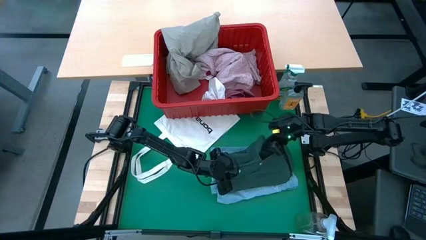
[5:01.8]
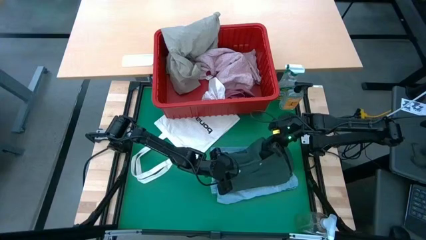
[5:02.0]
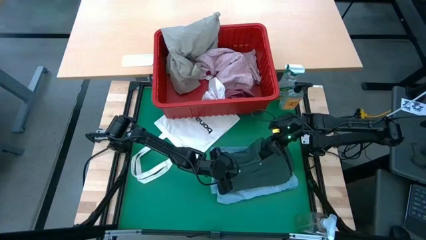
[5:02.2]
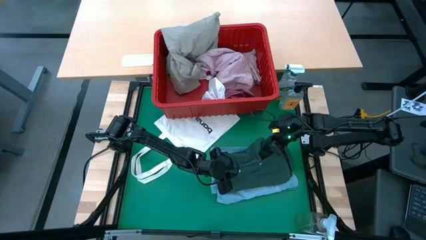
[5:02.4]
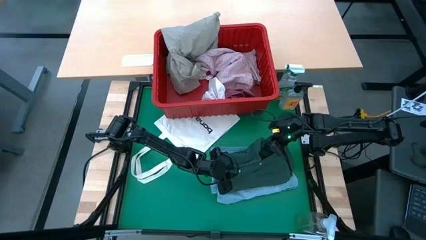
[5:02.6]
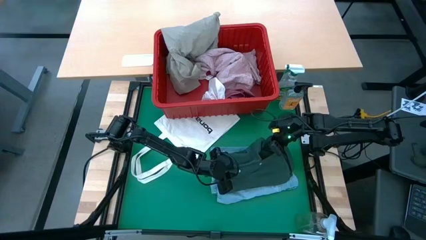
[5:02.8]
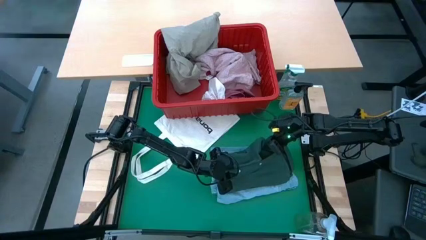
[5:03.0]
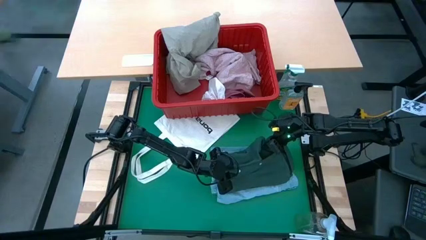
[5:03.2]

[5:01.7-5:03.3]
Task: Fold laundry
Fold the green shirt

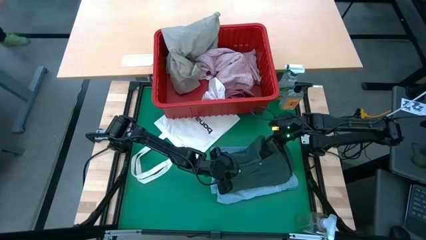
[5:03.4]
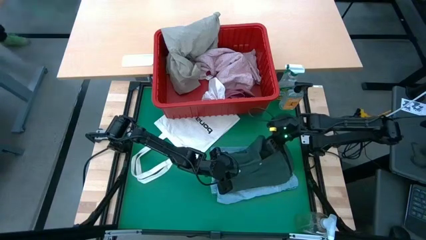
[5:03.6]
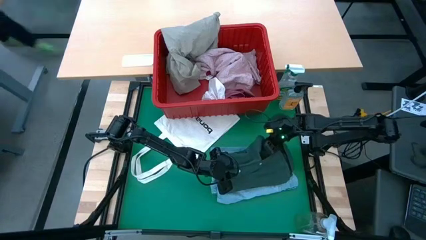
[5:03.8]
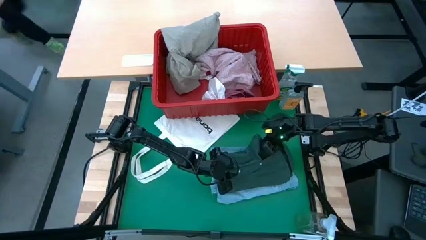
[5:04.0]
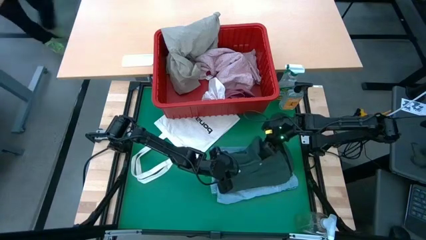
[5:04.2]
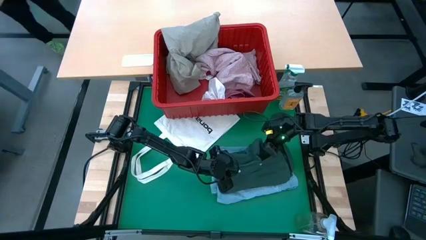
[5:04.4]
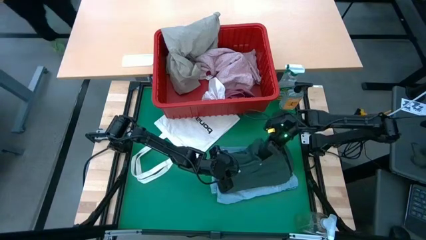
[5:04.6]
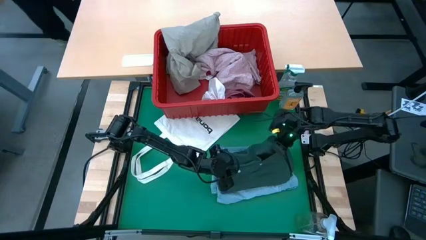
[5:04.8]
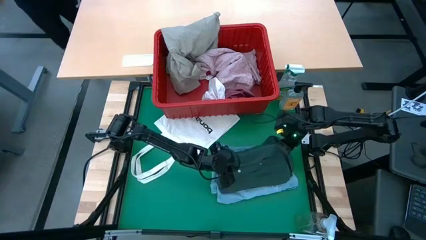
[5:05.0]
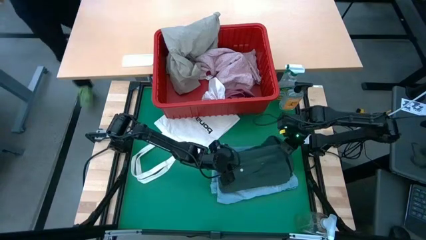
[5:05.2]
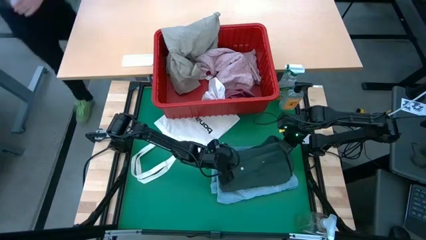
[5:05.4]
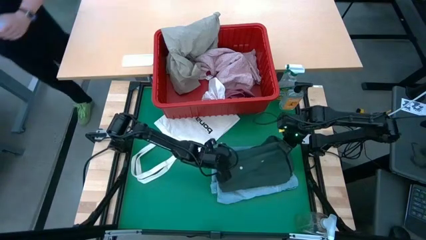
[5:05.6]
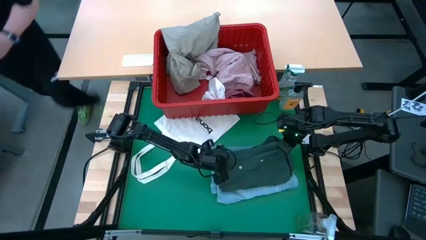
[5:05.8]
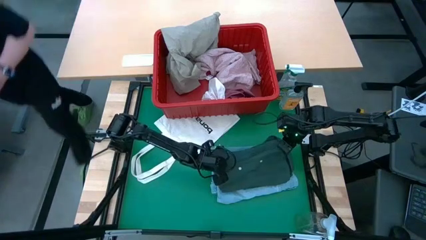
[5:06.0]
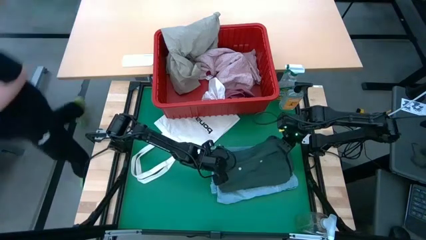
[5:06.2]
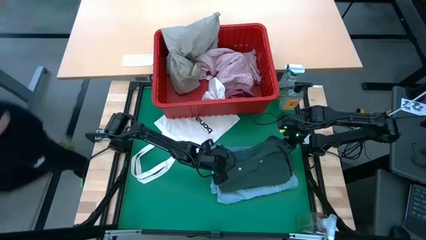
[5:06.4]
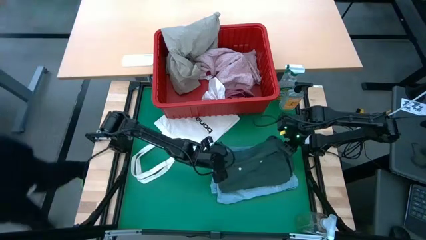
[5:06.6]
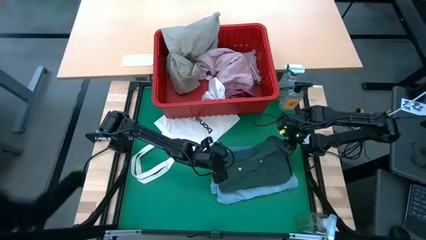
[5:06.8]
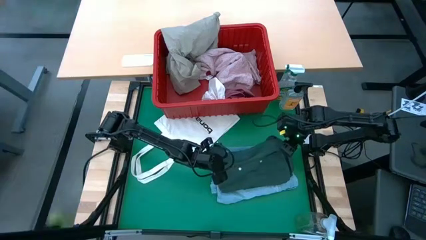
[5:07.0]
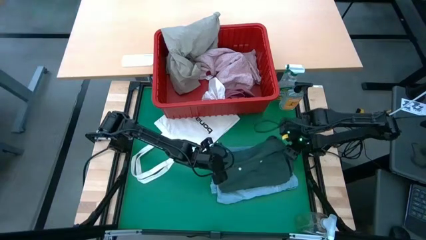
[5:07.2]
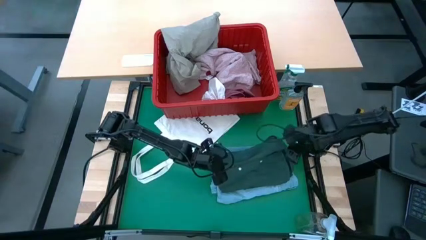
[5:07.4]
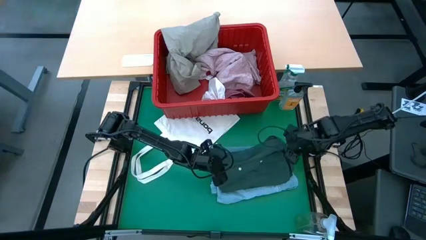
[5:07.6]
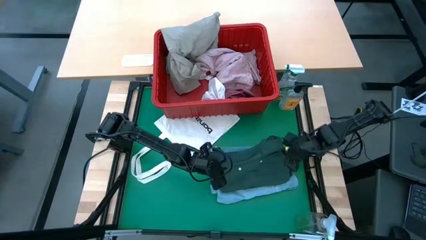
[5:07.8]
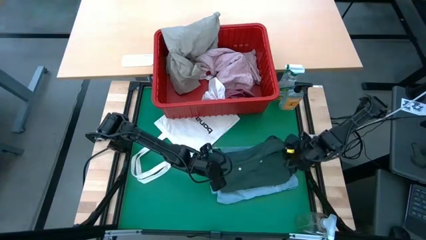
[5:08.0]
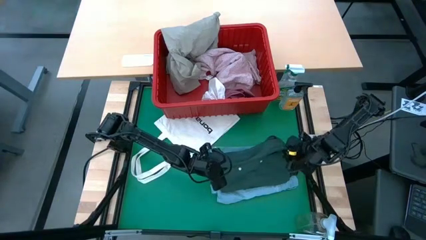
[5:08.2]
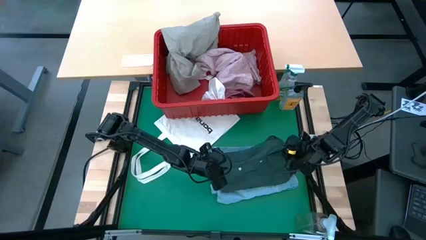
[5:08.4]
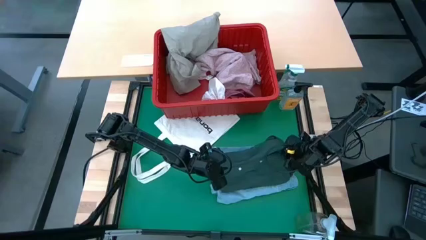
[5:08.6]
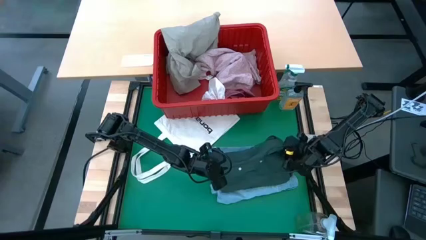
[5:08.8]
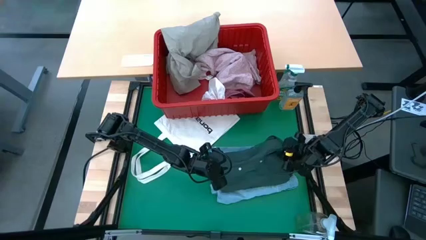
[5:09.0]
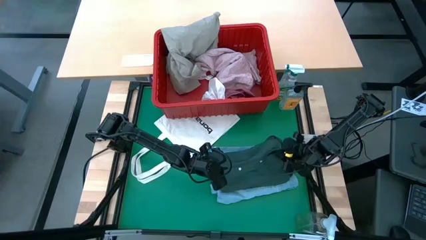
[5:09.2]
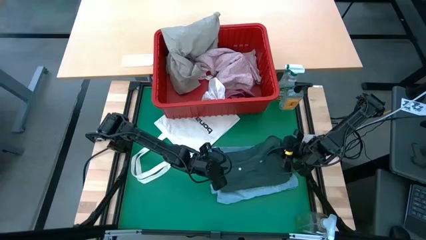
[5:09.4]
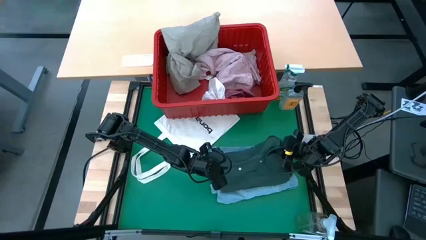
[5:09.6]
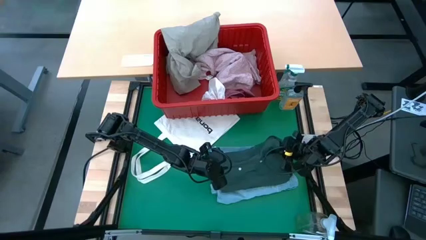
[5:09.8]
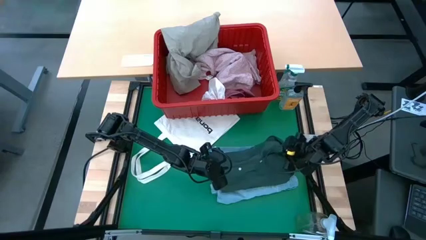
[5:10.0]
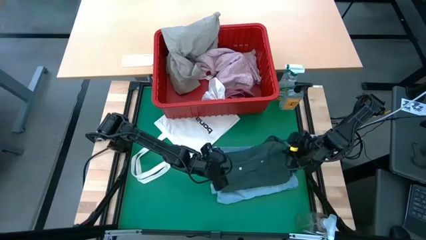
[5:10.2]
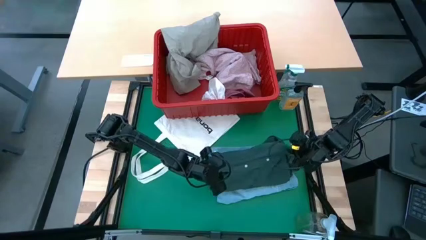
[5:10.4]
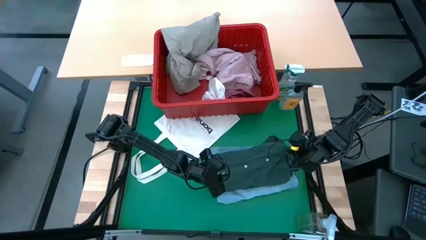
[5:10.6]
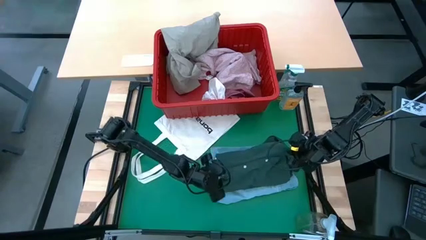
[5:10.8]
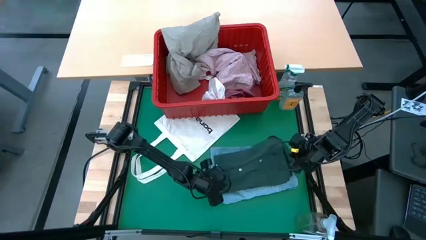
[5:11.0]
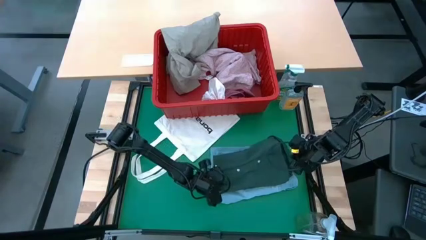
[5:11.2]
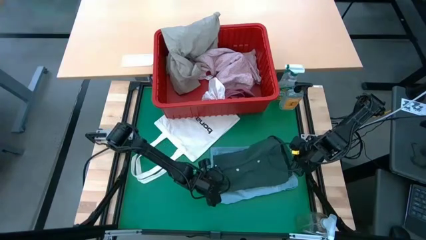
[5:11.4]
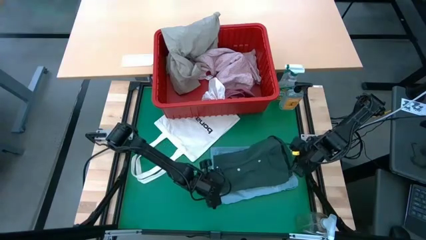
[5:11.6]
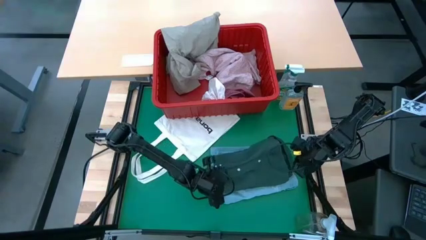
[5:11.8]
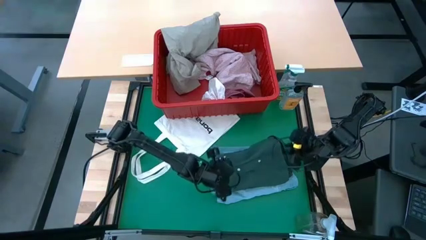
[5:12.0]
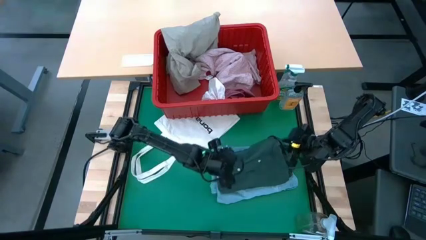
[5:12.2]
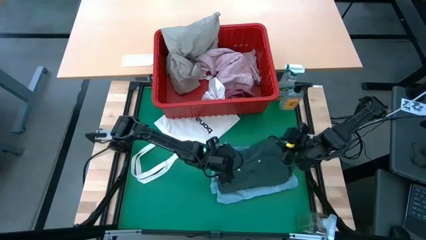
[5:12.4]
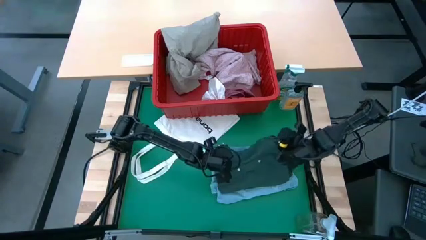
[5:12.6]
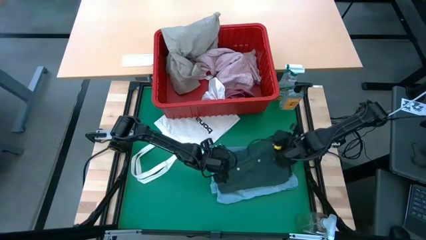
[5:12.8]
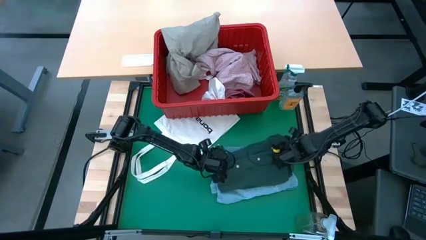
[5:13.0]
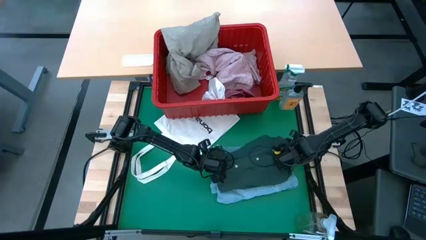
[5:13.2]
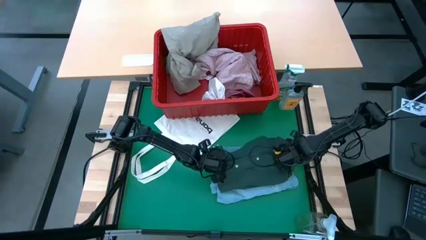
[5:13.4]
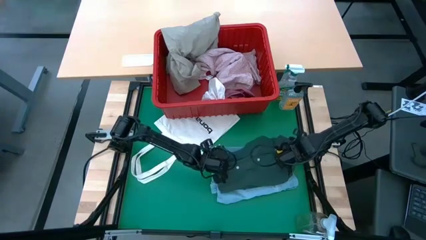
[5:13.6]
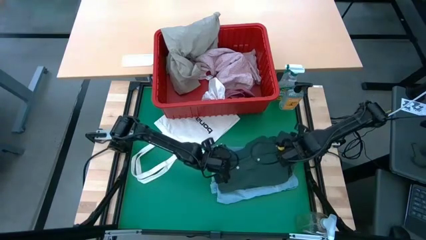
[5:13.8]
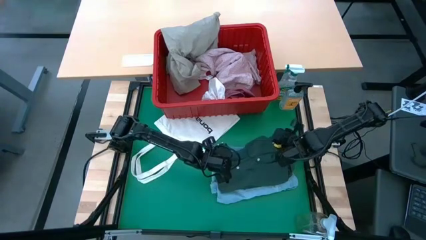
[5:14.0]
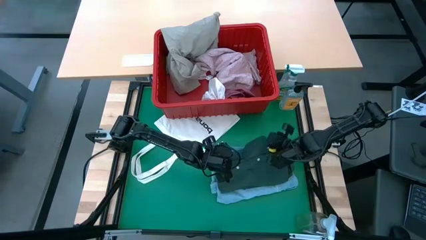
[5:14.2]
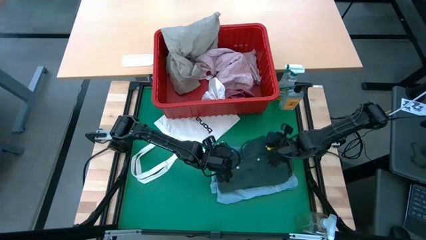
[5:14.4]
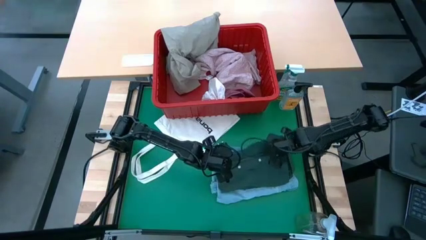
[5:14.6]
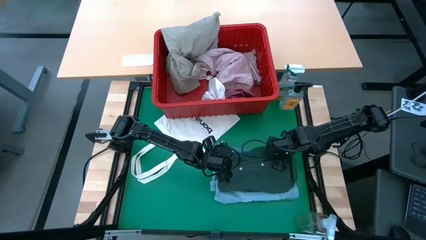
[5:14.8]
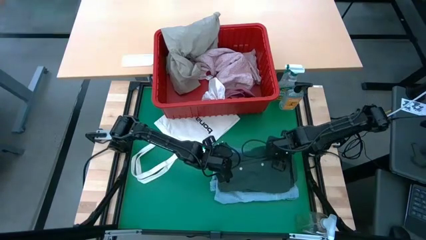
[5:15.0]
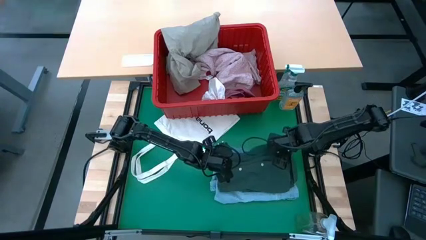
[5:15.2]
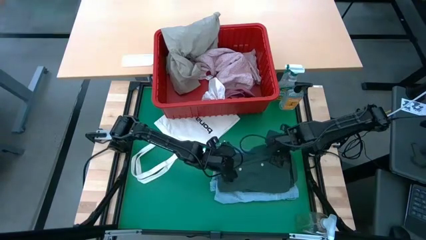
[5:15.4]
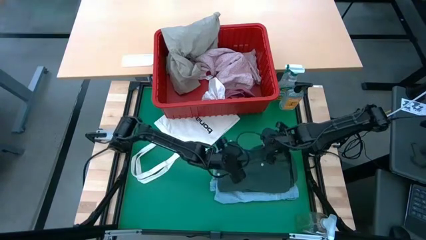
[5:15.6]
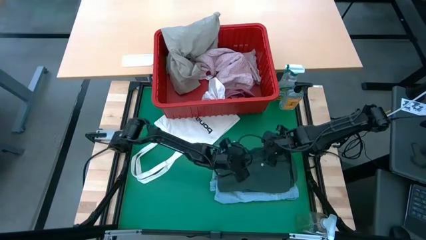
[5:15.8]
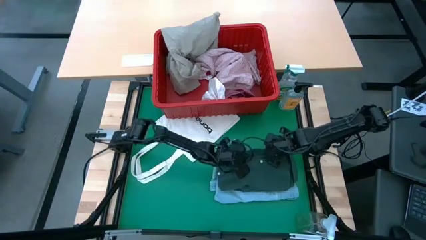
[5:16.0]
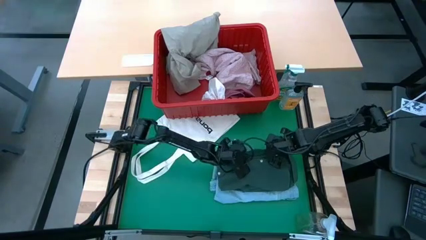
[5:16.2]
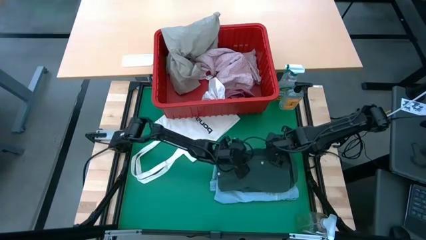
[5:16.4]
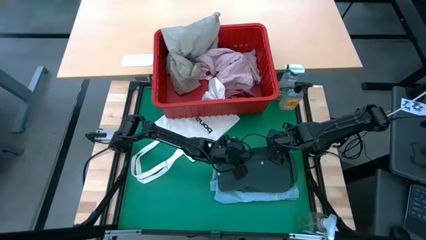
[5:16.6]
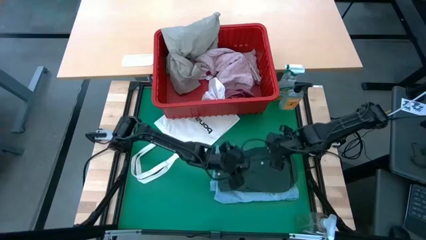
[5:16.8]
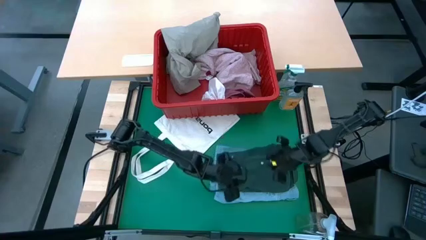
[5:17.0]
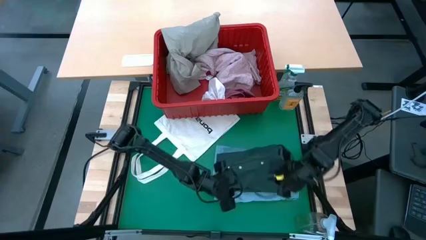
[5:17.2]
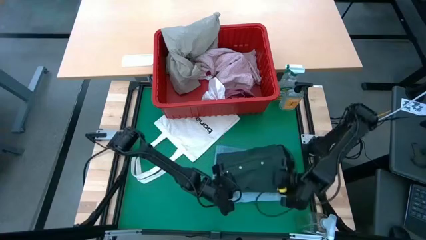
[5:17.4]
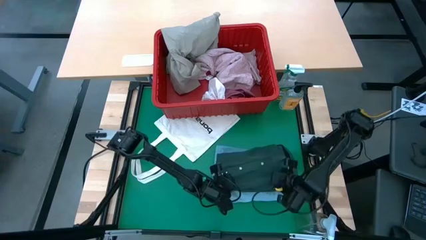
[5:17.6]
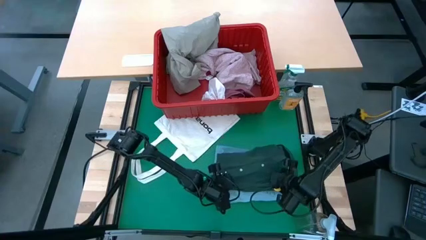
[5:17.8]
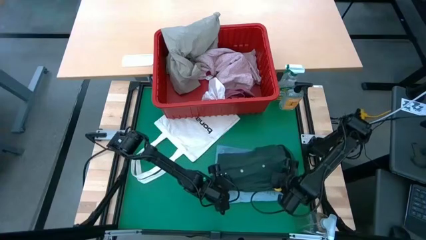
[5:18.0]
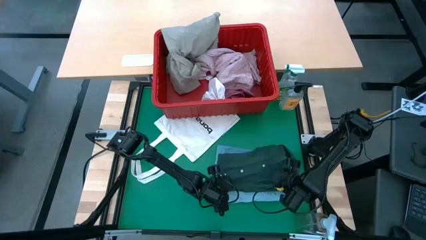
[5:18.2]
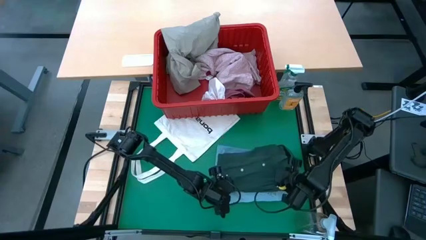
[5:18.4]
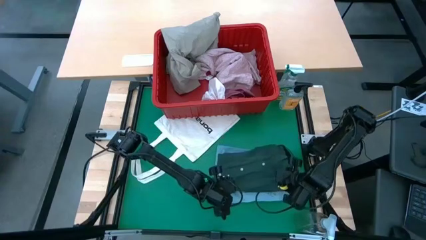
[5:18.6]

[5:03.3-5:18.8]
Fold the green shirt
